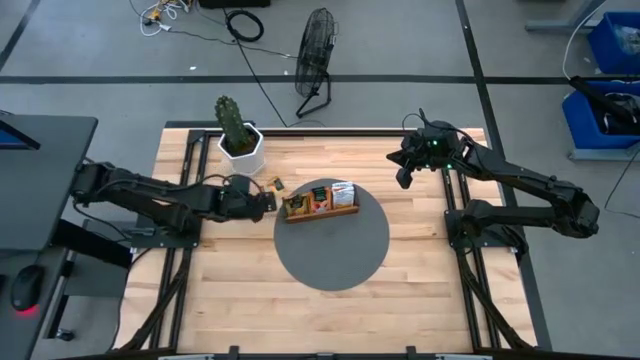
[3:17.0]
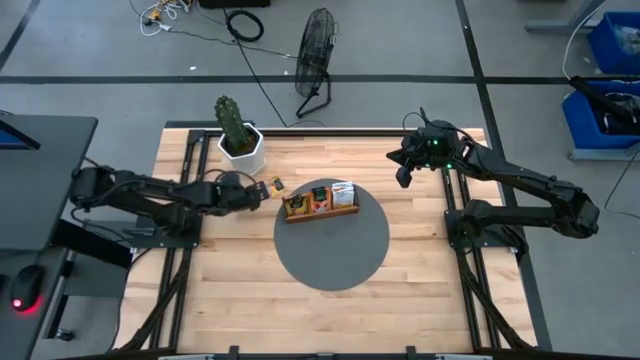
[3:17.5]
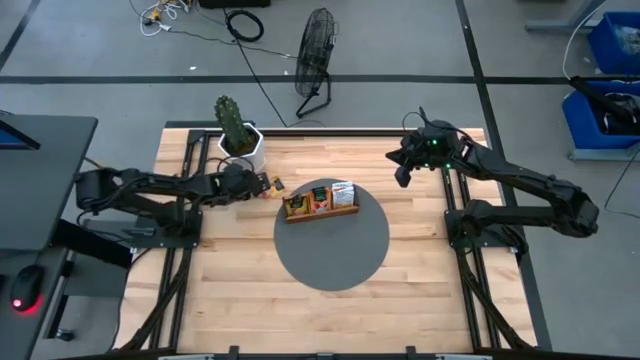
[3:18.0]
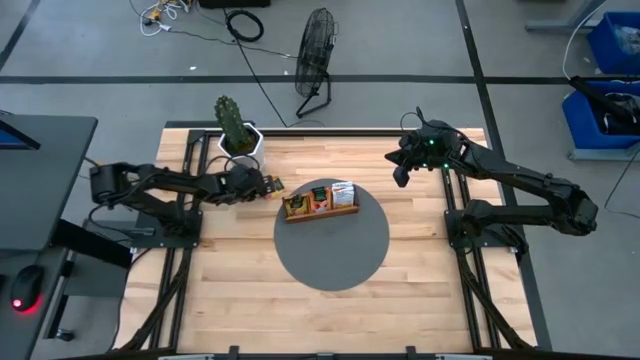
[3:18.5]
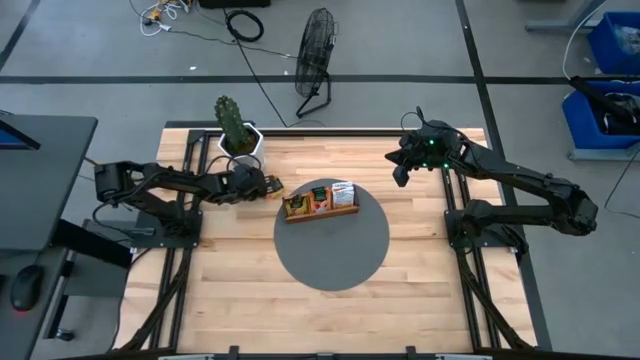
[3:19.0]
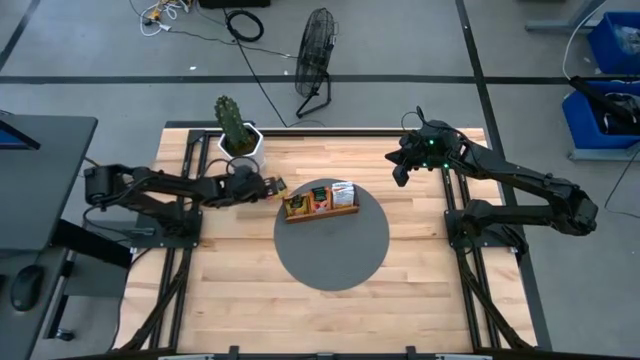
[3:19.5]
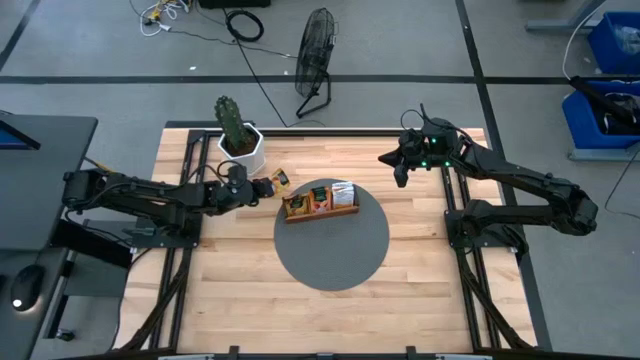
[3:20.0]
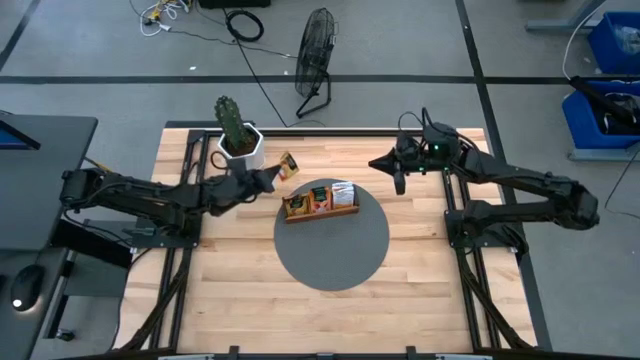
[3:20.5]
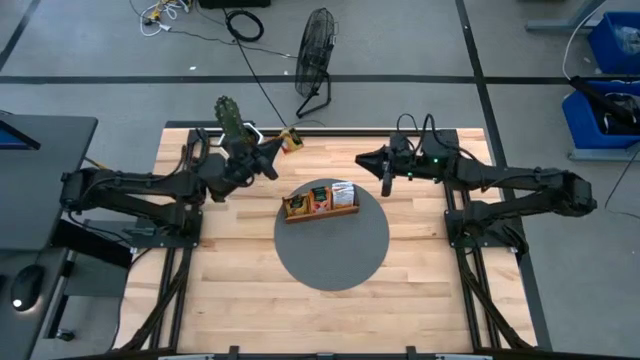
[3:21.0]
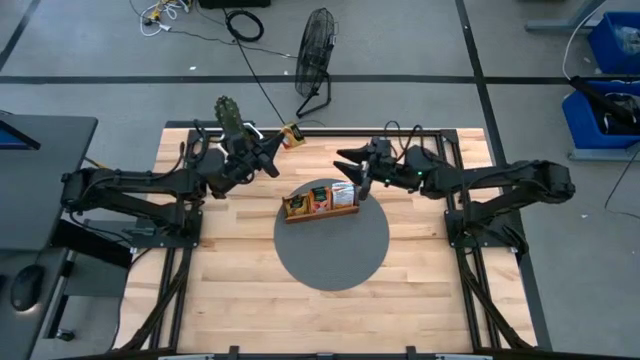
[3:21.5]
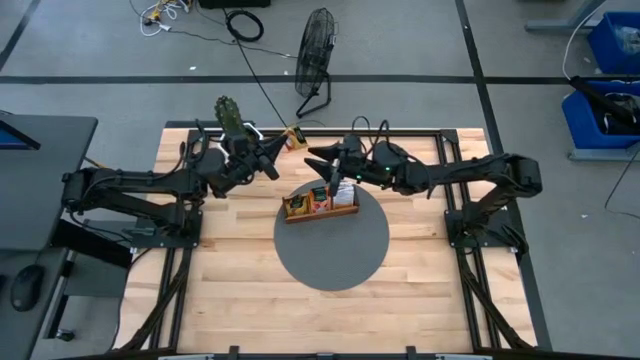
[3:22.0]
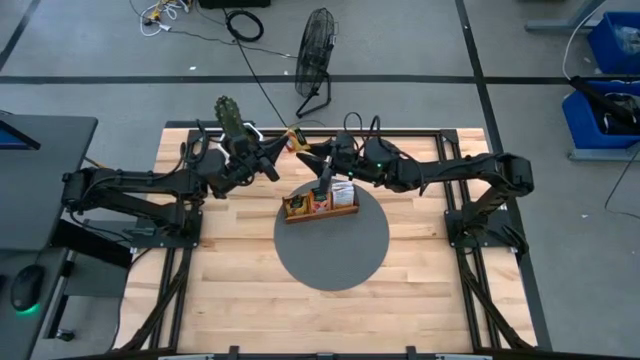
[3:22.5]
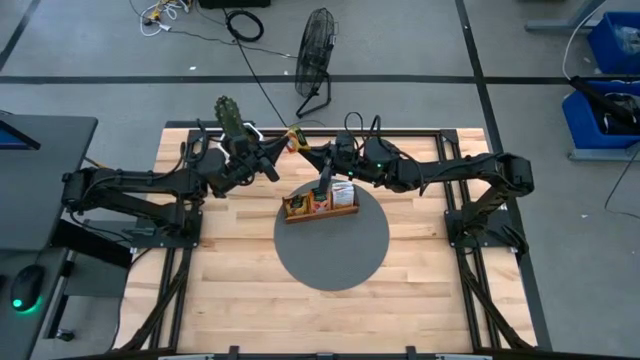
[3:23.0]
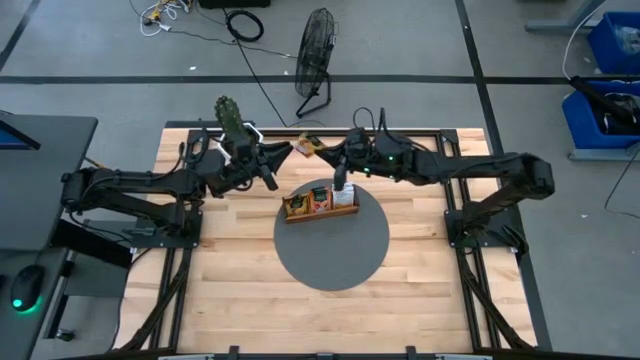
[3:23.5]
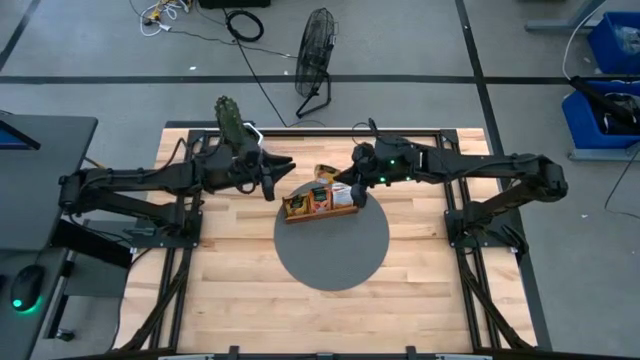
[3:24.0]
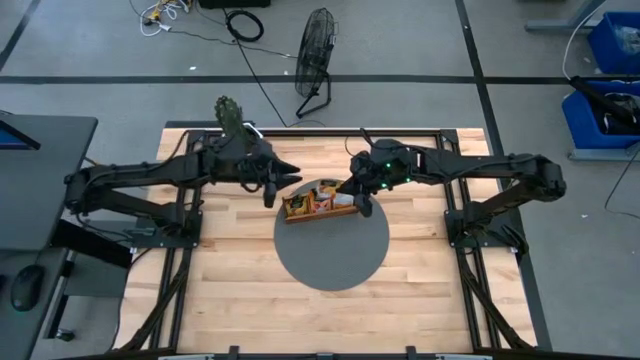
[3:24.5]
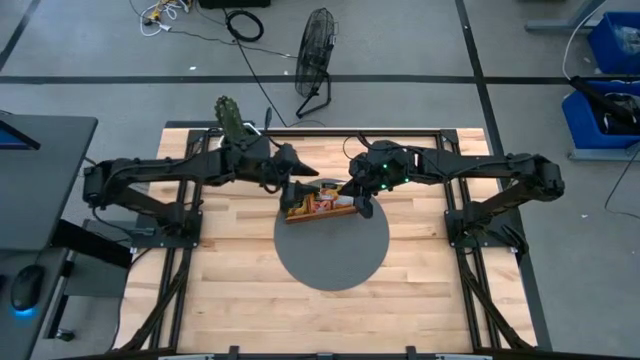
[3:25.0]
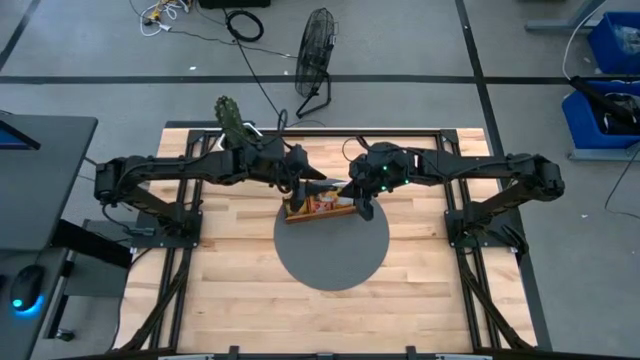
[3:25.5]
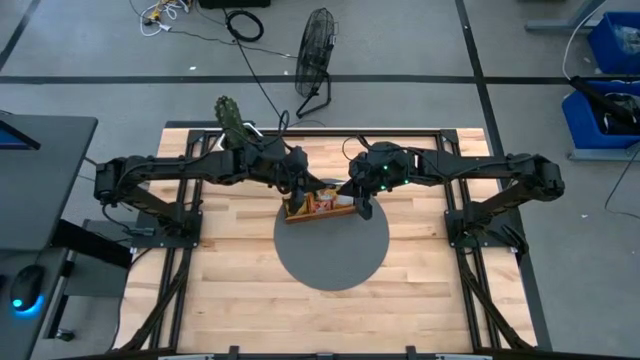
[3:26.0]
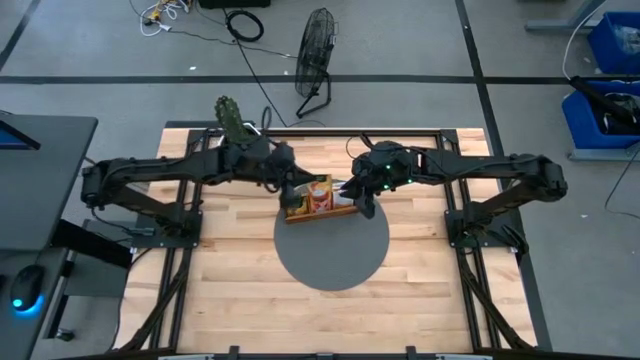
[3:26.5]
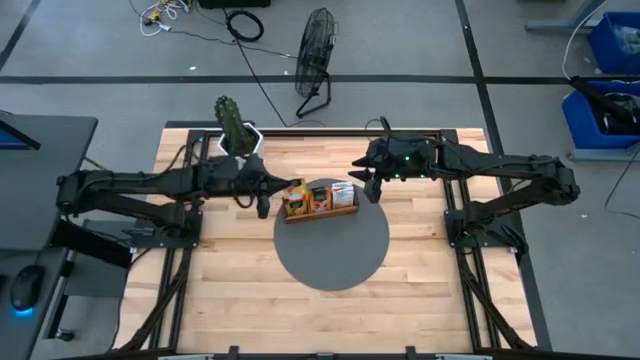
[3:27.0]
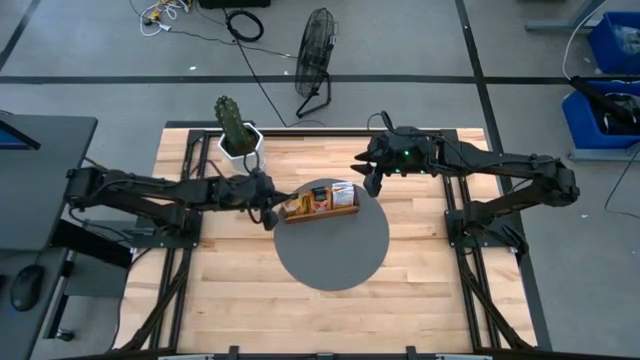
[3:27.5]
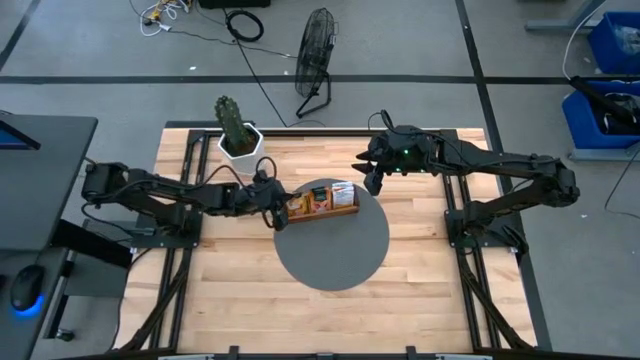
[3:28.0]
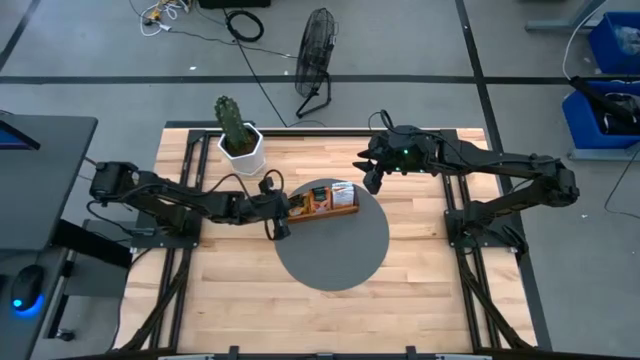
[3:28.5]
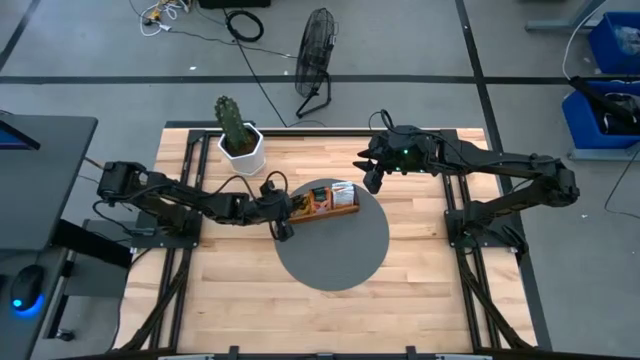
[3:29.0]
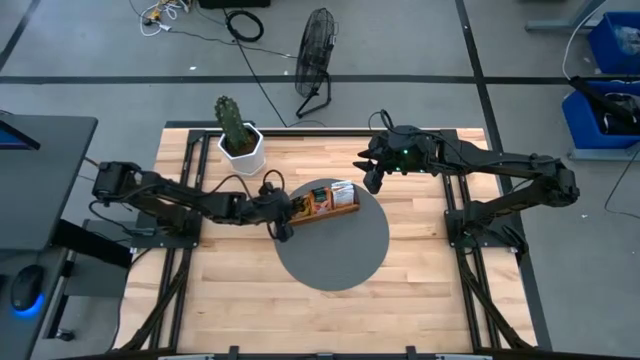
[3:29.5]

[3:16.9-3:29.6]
Task: Pick & Place Tea
Put the orange tea bag into the left section of the wooden organizer

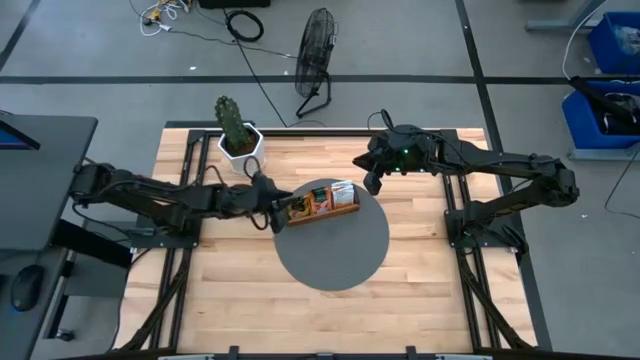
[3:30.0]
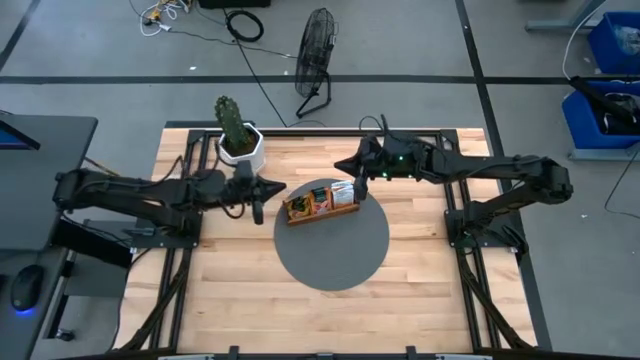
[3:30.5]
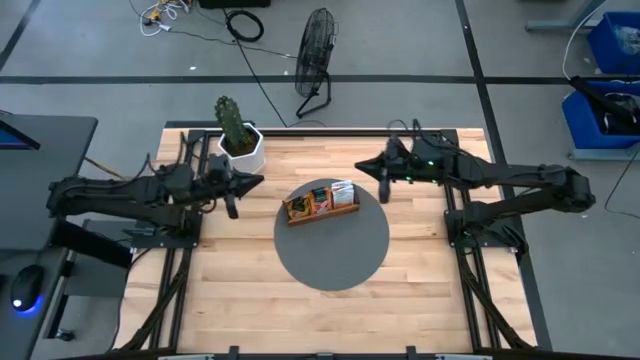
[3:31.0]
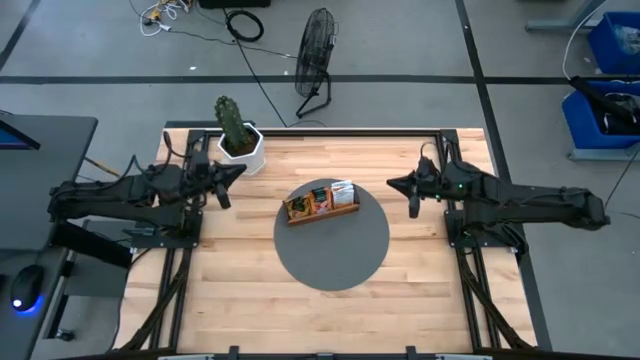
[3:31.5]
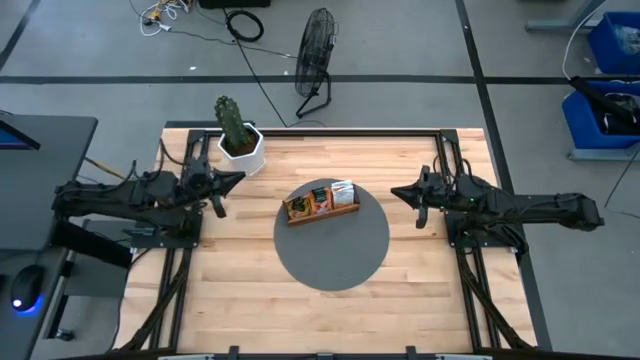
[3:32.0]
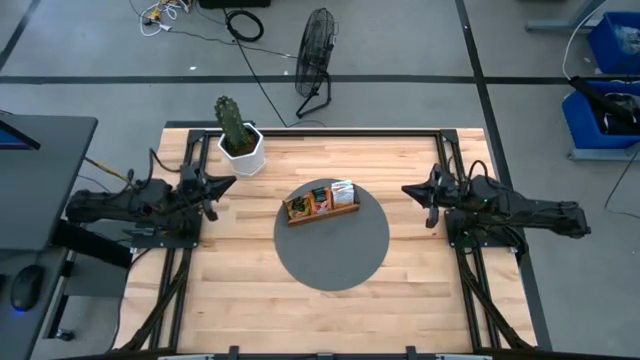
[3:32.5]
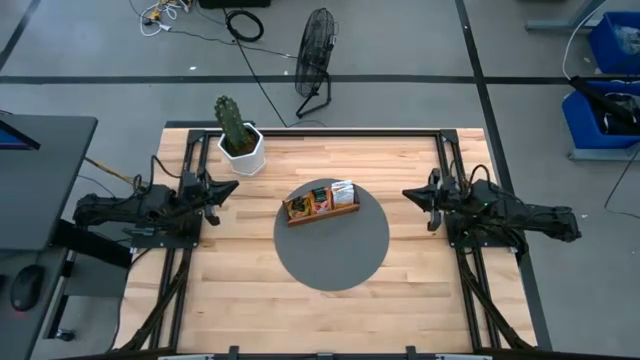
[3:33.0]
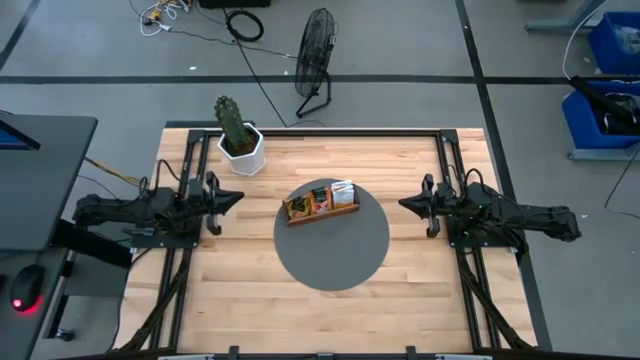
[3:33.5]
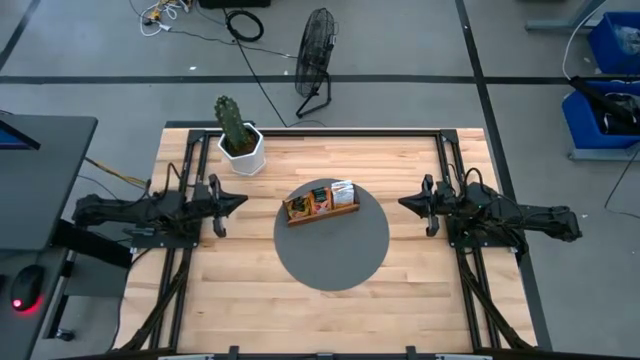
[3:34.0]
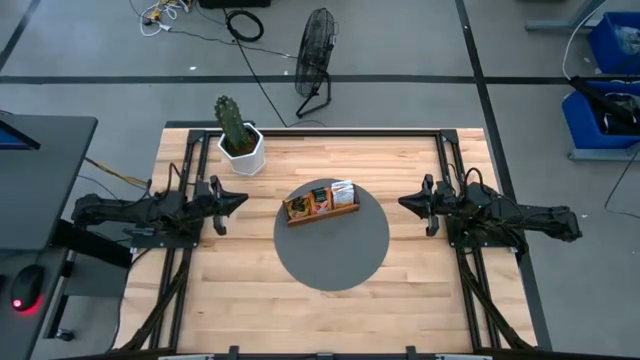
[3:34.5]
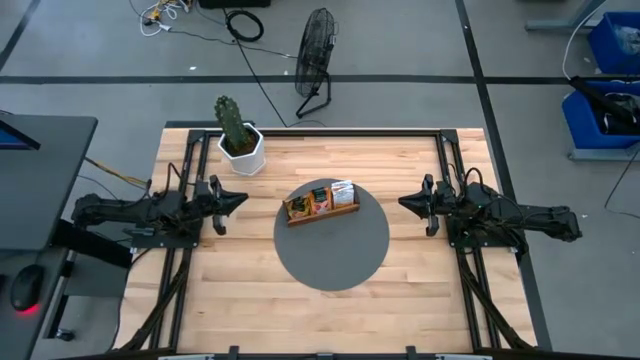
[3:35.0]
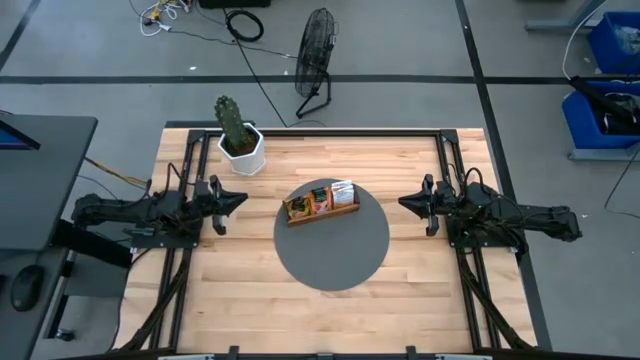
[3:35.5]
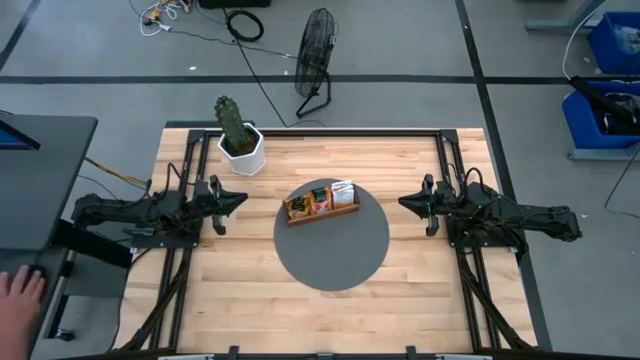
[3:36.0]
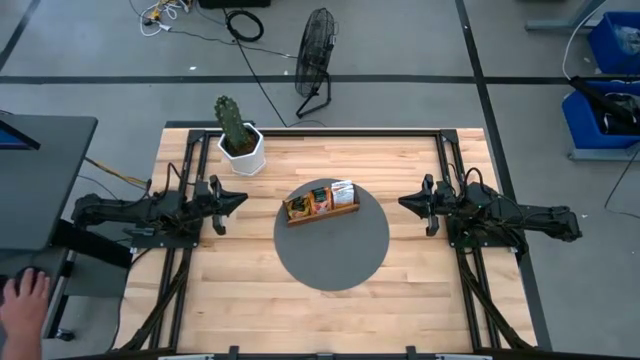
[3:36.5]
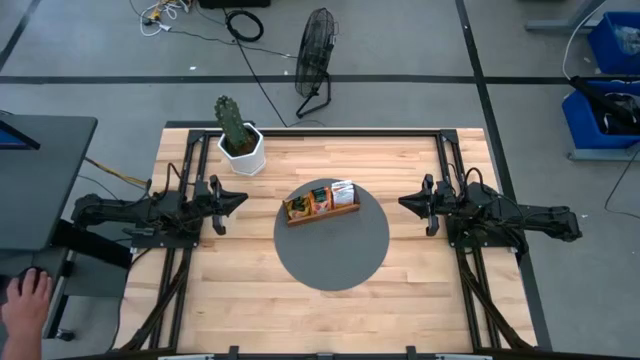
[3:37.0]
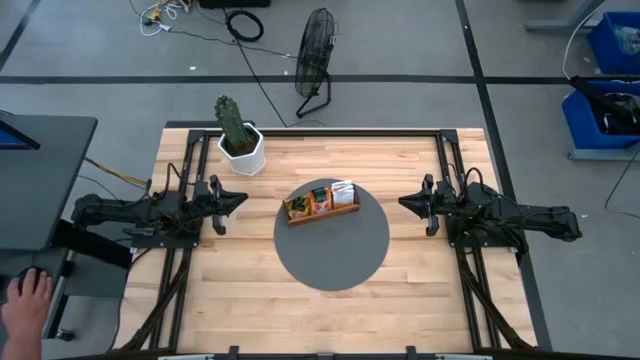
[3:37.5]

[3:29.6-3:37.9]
Return to home position
